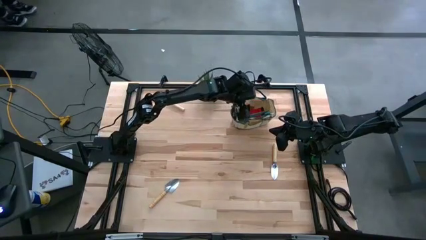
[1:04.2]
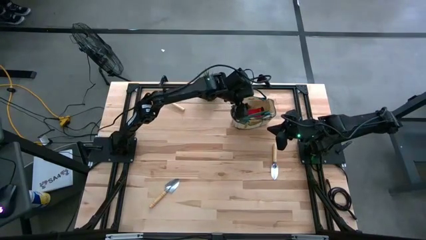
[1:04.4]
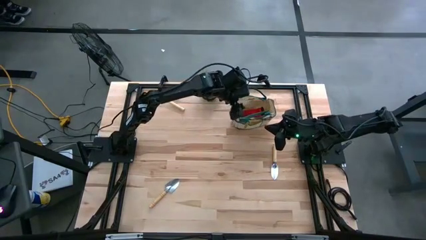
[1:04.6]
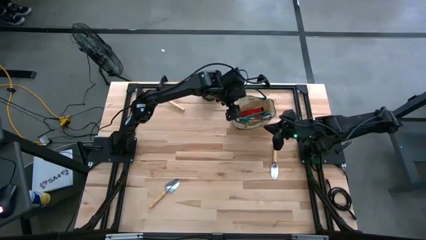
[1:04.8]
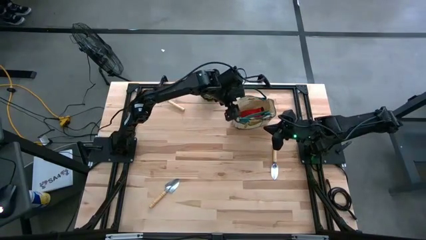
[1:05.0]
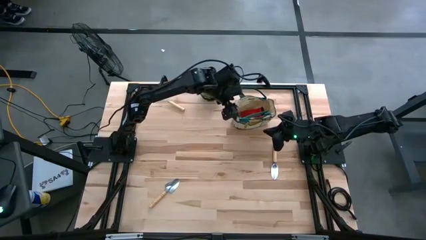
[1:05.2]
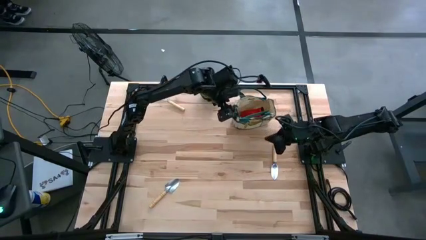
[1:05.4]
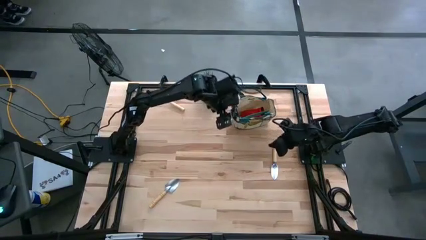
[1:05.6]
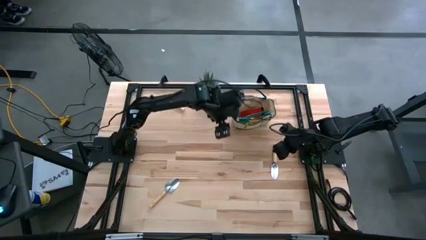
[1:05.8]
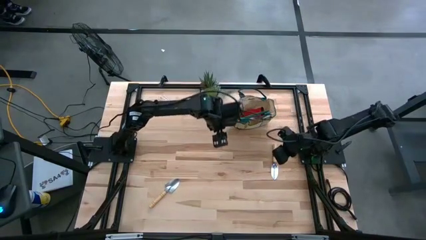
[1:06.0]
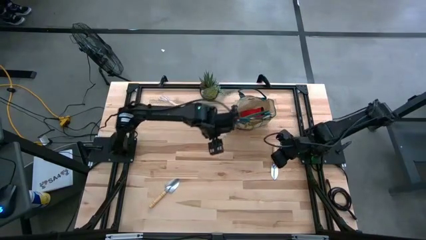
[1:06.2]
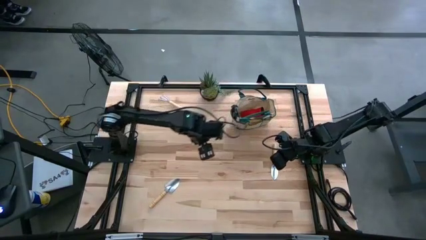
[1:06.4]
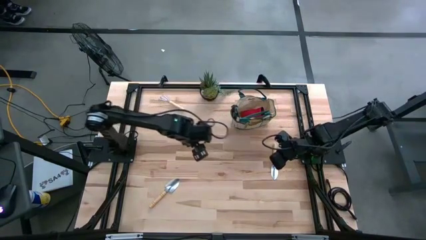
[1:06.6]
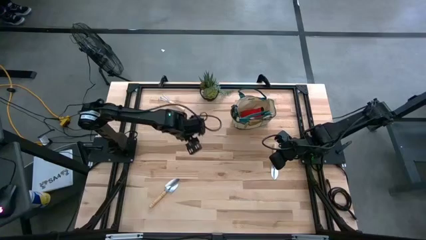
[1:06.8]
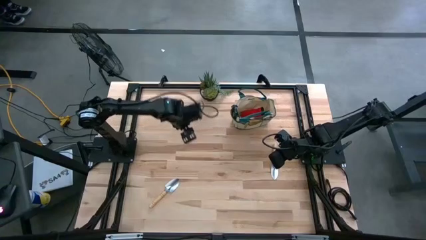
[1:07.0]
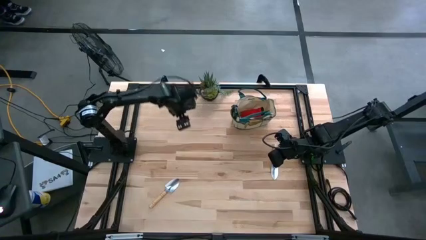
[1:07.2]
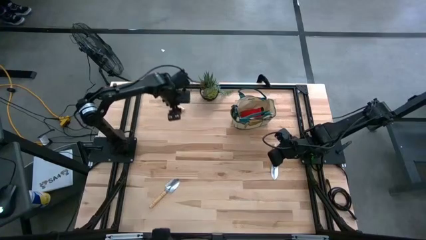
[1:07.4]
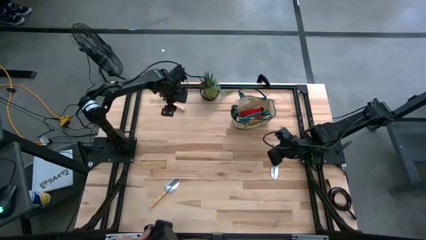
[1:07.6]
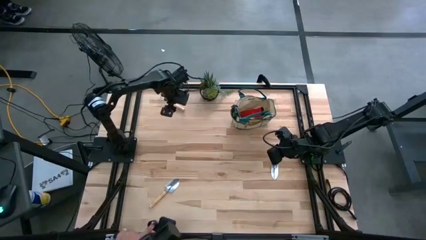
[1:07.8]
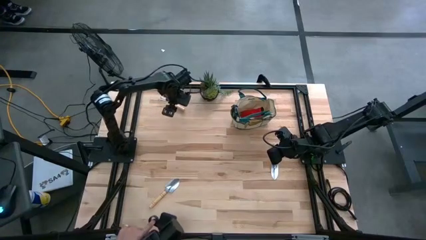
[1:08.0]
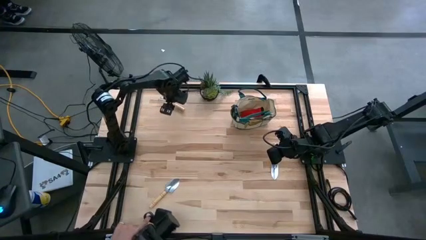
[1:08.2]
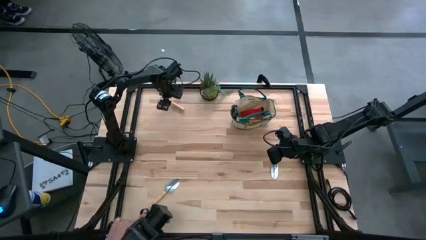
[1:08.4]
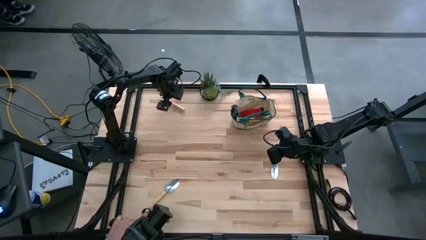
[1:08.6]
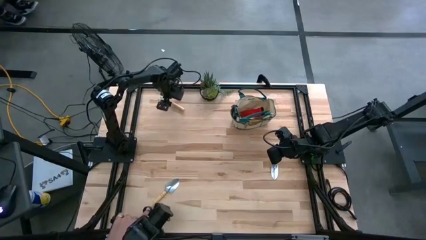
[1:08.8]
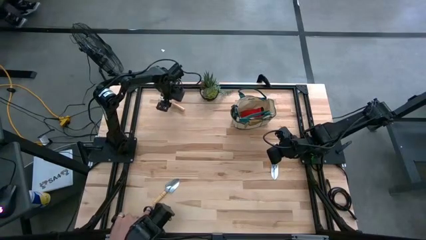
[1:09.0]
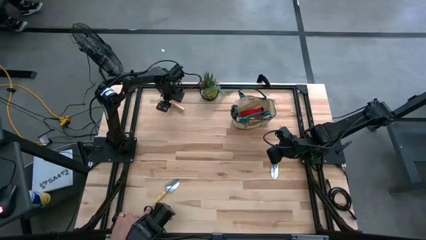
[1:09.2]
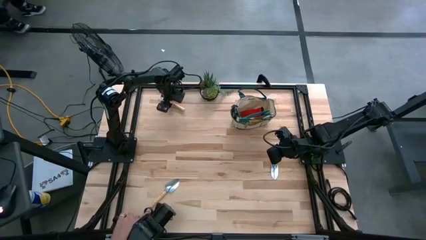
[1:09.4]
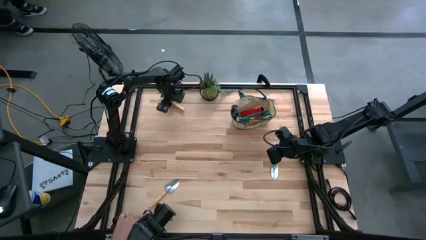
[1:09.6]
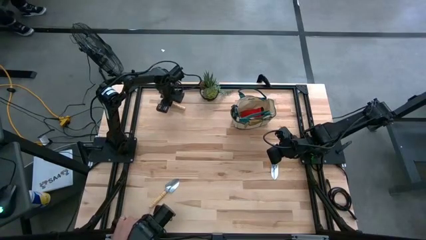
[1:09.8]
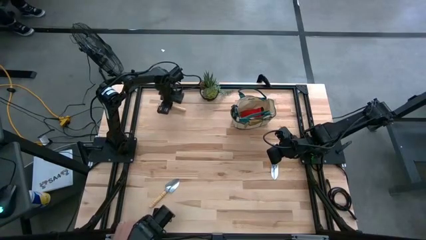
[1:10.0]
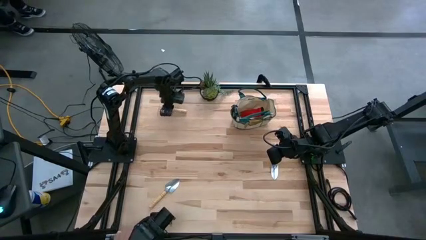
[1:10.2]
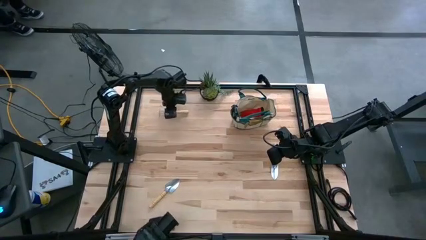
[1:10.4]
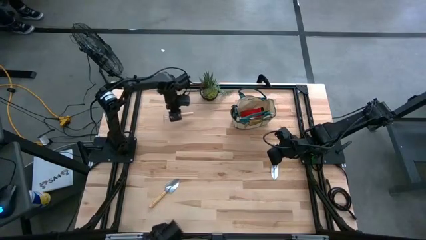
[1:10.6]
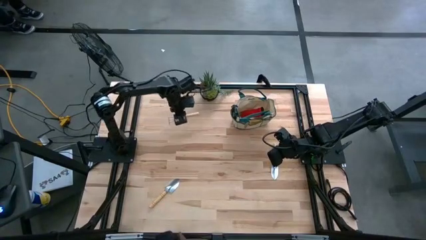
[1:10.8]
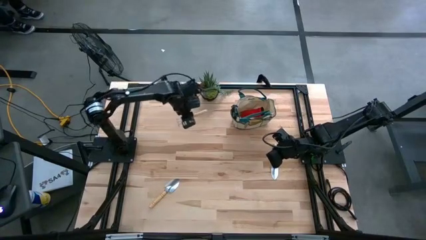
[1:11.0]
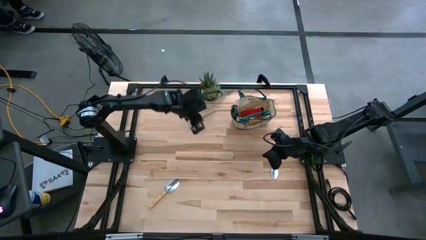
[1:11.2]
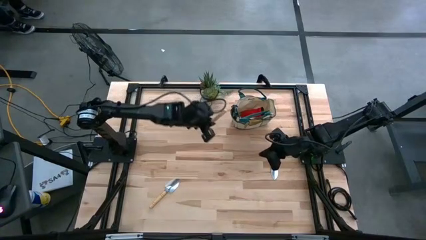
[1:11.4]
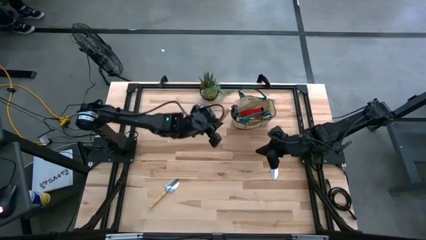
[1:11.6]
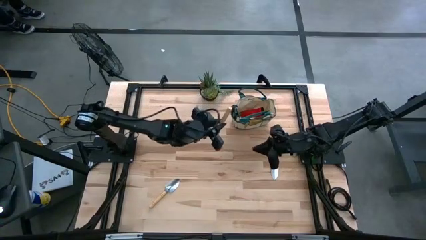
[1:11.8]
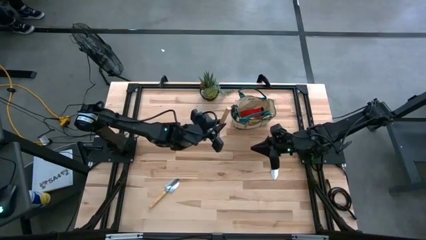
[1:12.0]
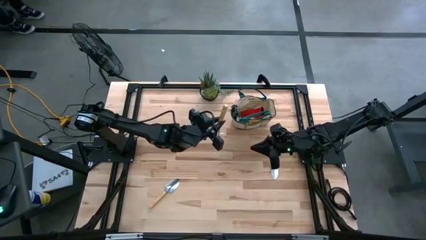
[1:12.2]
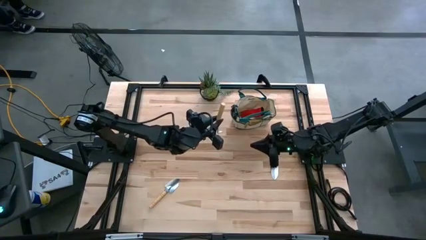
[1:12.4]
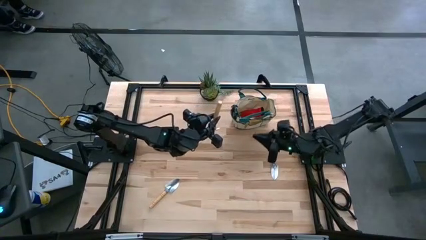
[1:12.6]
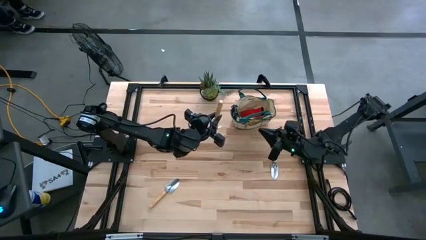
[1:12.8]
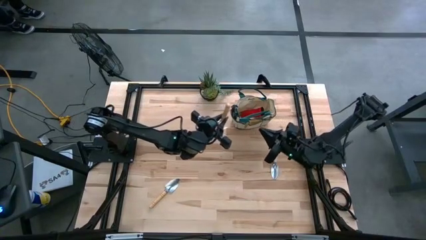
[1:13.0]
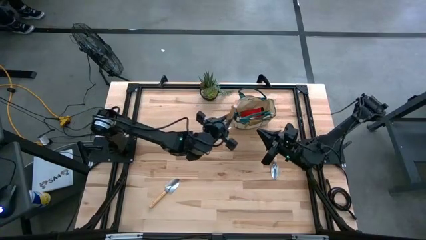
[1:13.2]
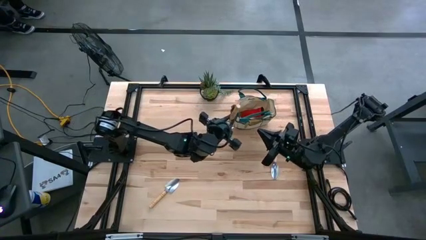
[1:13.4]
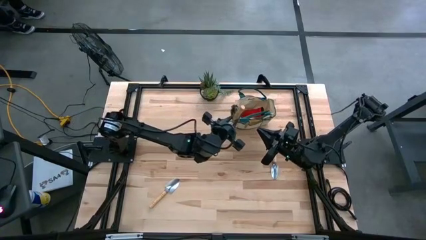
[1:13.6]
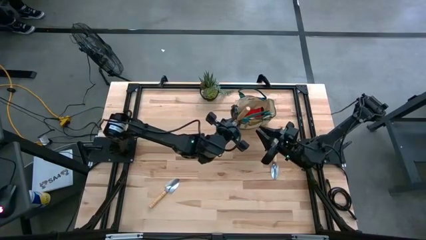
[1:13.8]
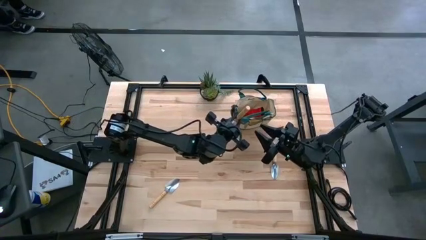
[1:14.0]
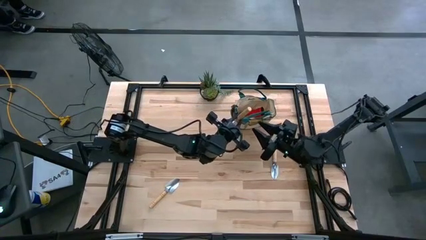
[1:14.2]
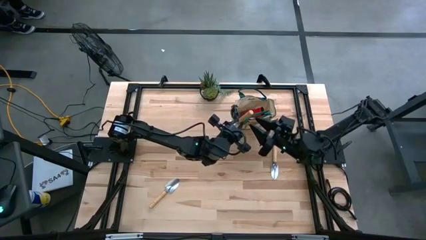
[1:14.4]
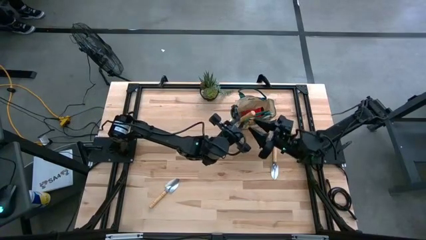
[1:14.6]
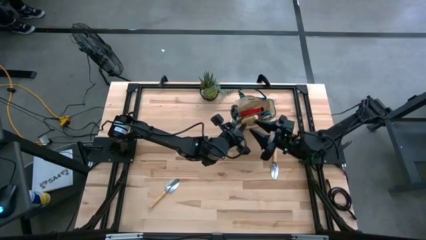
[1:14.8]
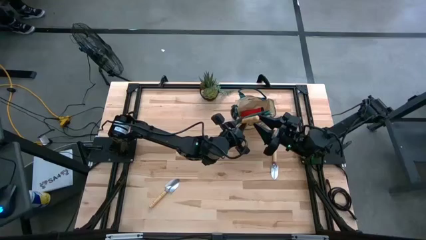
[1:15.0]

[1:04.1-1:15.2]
Task: Pick & Place Garden tools in Gardening bag
Put the light brown hand rake into the light brown gardening bag

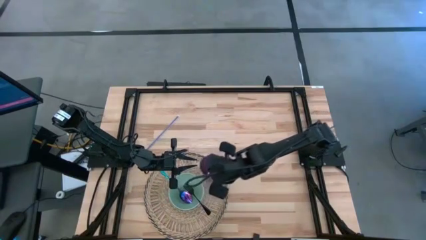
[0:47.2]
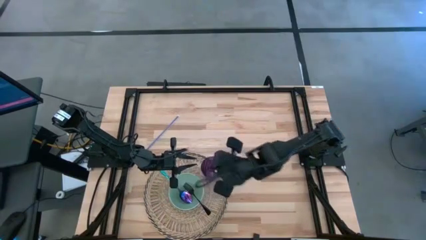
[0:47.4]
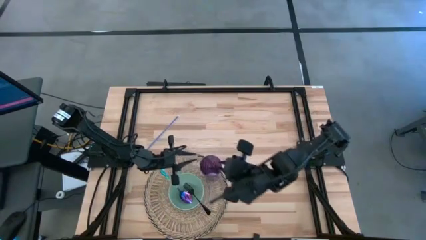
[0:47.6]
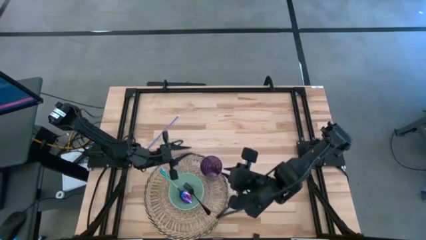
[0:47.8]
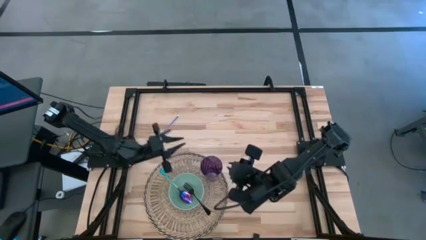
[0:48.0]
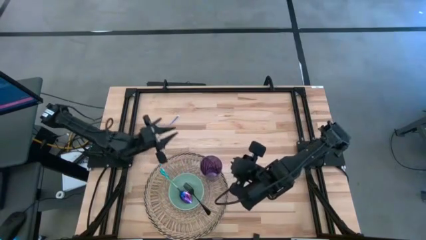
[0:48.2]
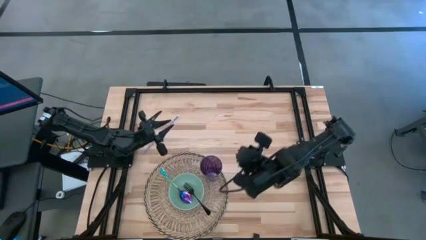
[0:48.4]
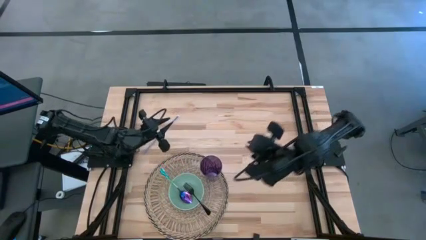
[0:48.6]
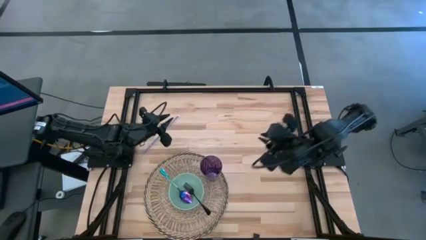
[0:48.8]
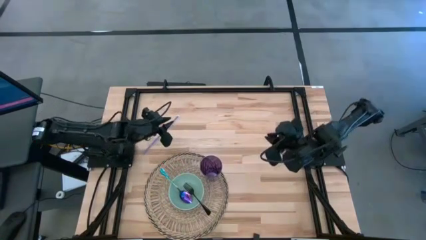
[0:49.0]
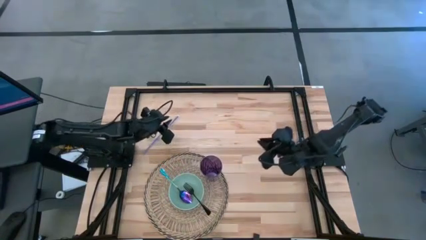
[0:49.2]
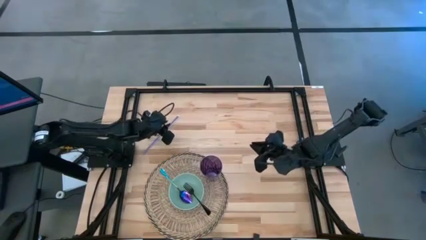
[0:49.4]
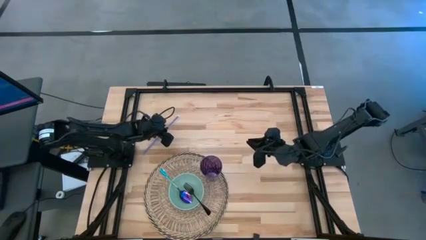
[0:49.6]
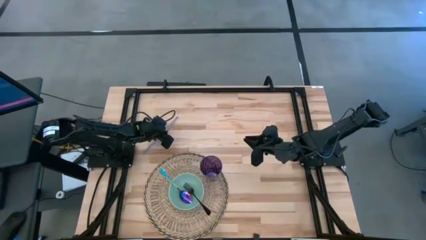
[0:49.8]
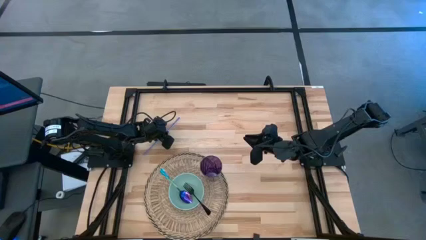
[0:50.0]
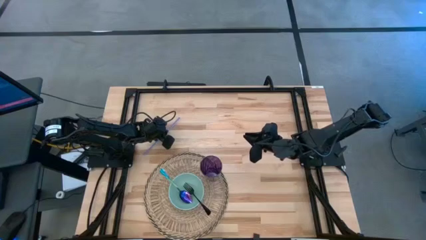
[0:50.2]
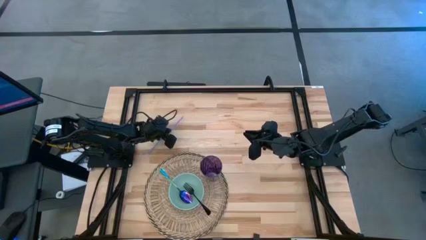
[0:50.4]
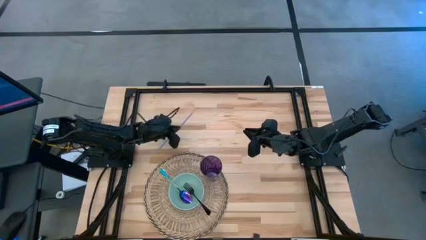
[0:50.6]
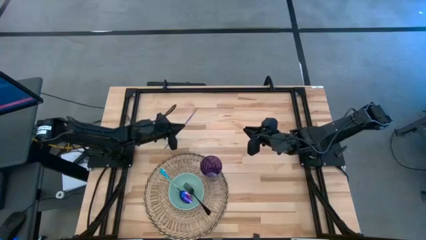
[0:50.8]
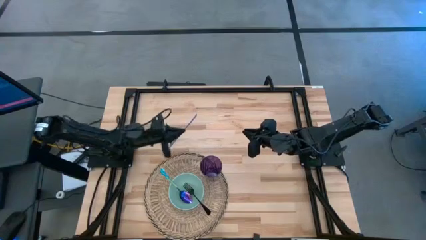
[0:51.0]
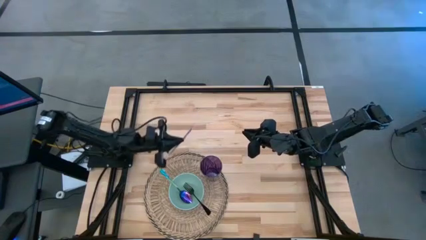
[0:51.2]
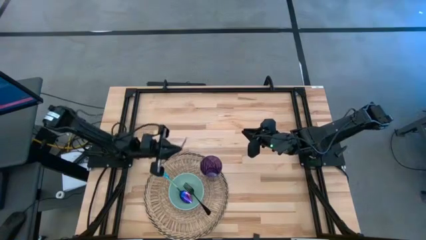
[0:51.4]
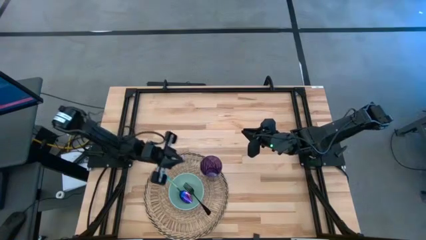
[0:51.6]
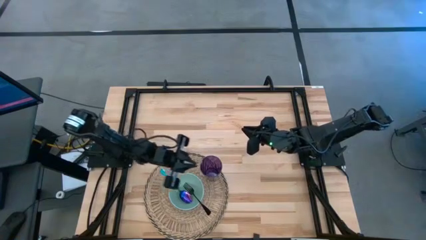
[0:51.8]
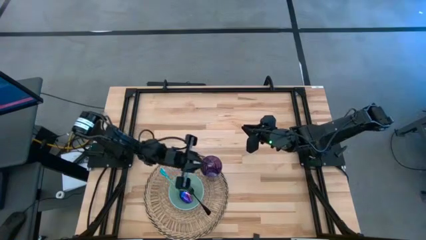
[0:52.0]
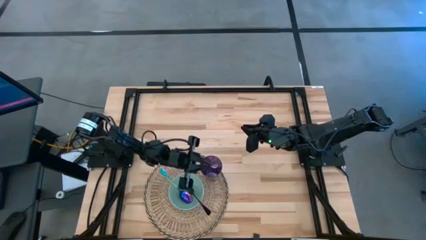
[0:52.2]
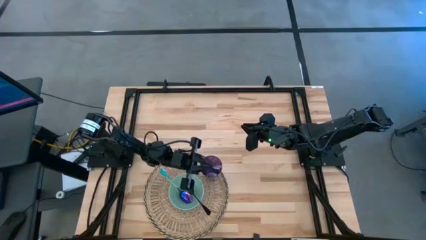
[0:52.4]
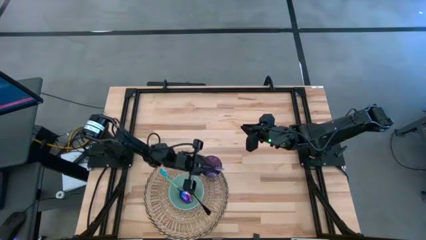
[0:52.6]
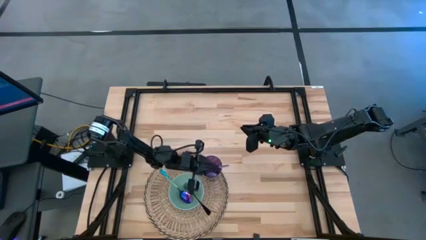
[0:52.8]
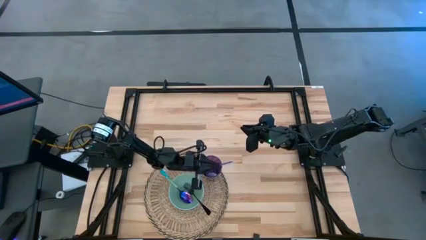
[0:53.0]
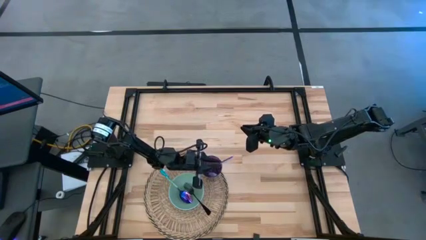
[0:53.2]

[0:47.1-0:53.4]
Task: Pick & Place Utensil
Put the violet straw into the violet cup on the brown mat
